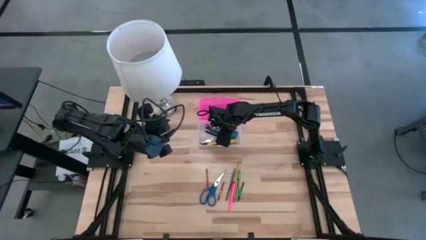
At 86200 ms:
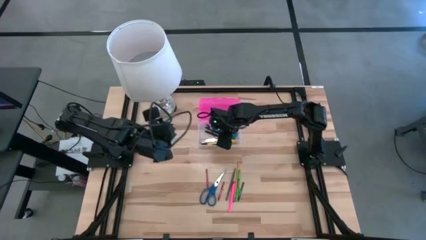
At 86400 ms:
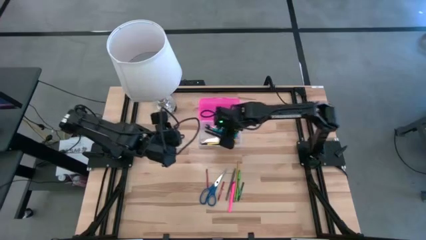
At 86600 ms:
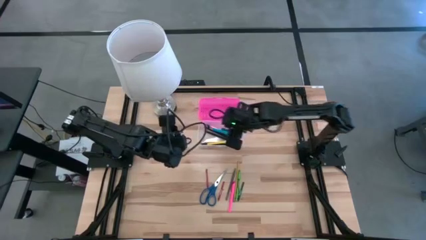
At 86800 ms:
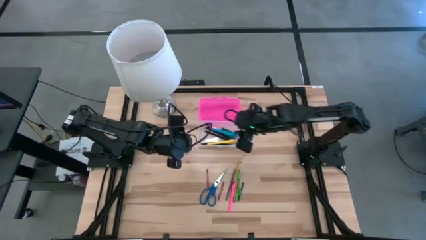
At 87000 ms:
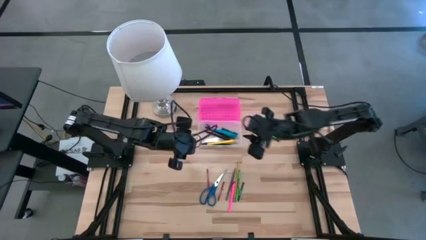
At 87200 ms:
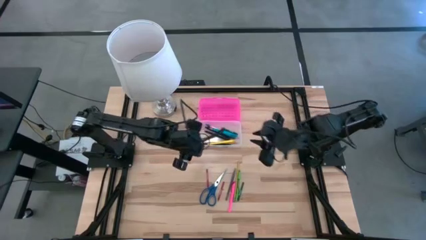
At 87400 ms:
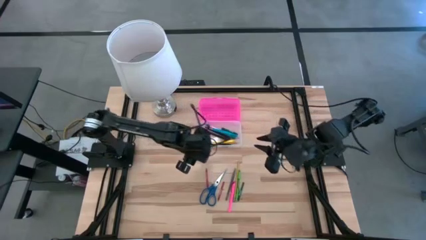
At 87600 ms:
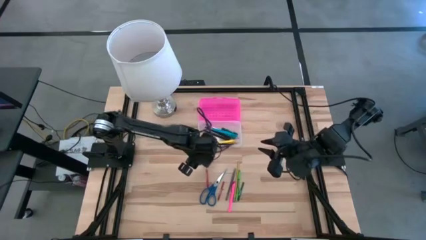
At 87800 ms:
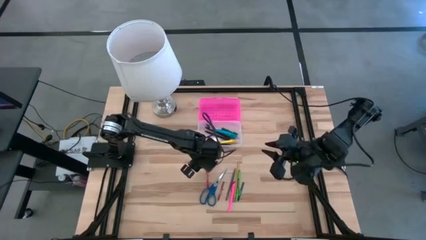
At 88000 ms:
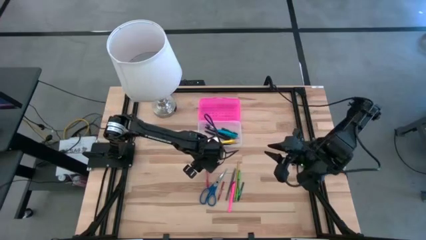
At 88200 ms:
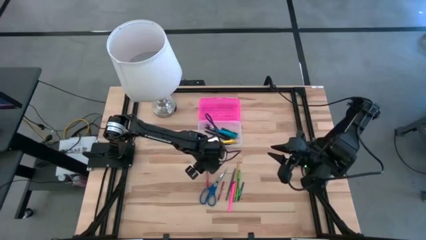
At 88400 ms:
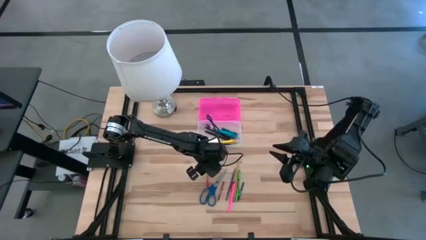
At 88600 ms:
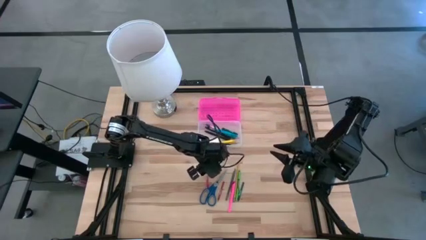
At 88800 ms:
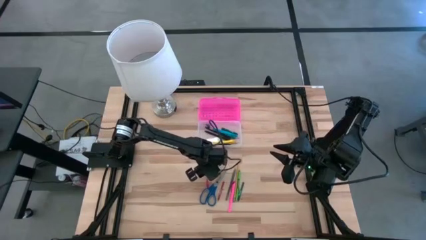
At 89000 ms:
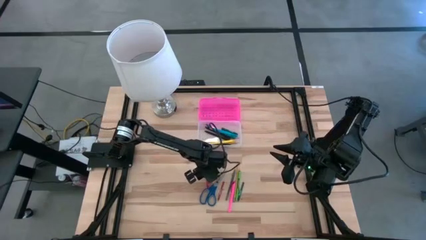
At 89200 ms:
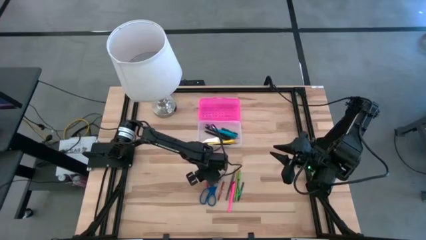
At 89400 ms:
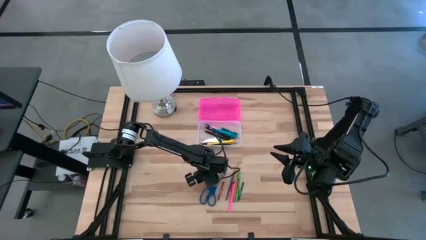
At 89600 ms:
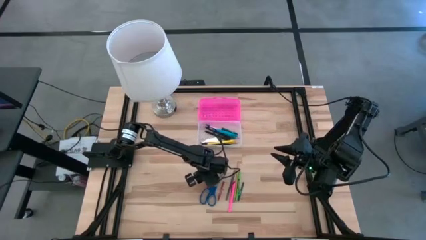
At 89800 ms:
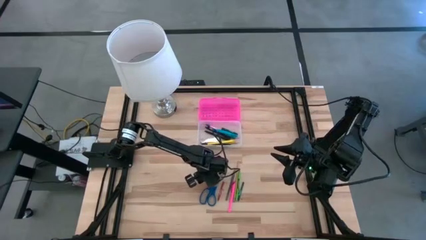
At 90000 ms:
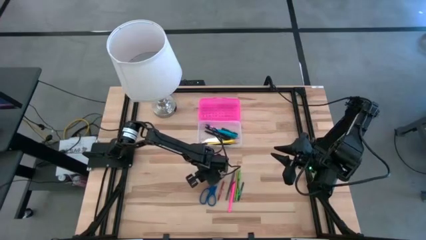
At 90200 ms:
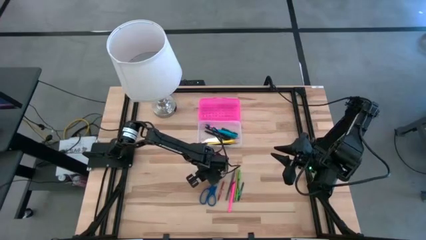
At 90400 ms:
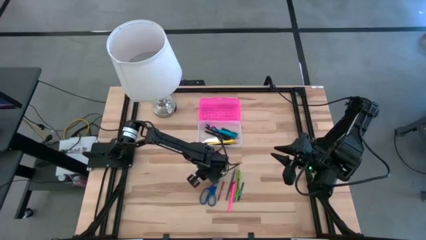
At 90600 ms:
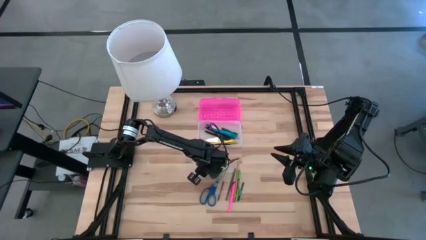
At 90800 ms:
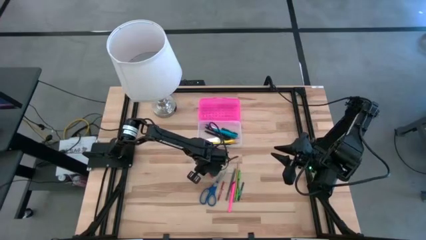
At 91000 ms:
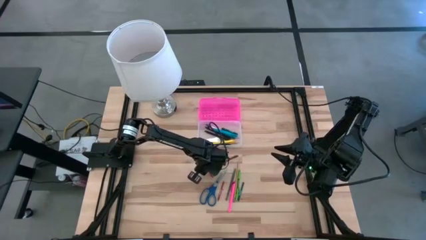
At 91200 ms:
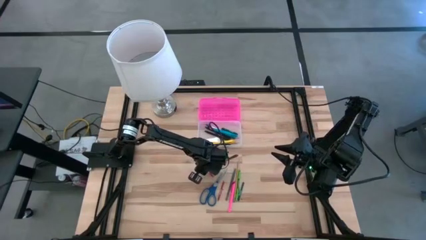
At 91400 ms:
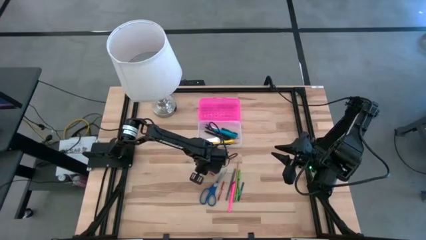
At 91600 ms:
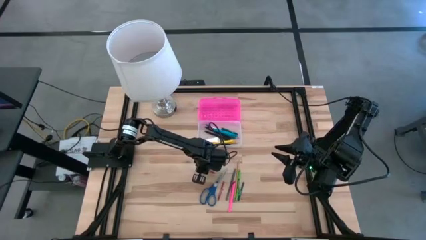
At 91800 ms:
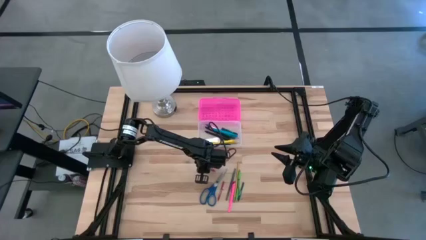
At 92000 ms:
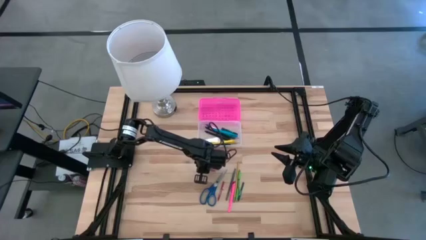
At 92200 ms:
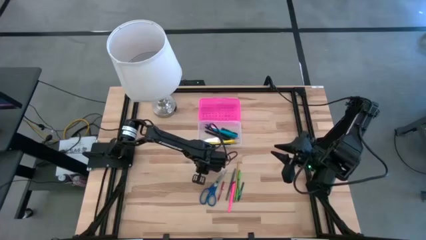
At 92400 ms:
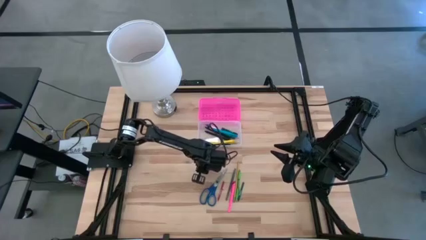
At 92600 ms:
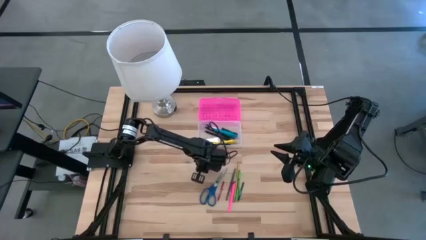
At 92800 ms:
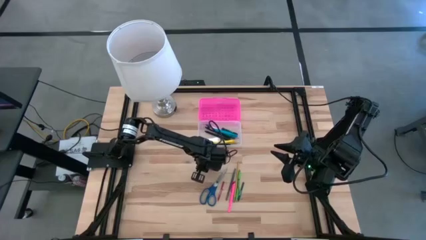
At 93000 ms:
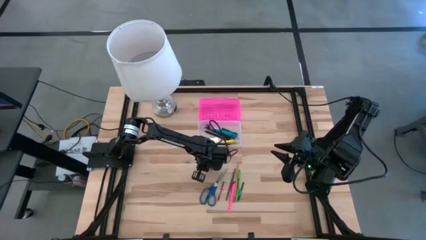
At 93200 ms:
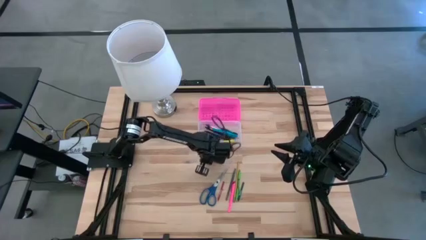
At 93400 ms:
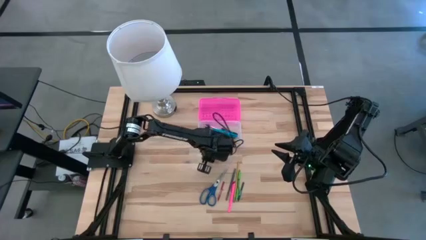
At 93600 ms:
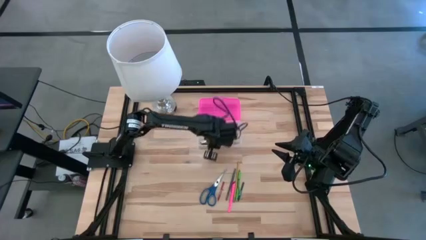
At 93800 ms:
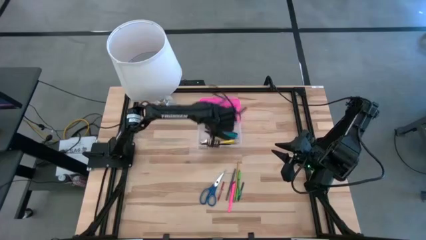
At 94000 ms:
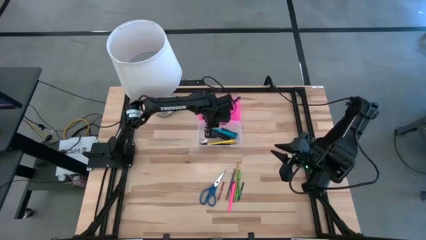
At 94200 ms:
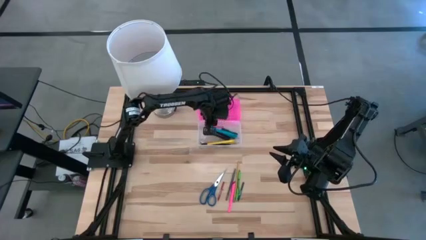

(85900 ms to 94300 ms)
Task: Pick & place school supplies into a supply box
Put the left red crayon into the pink supply box

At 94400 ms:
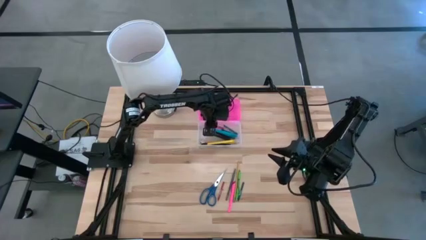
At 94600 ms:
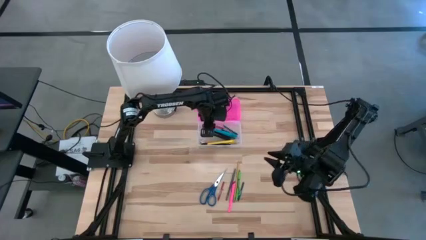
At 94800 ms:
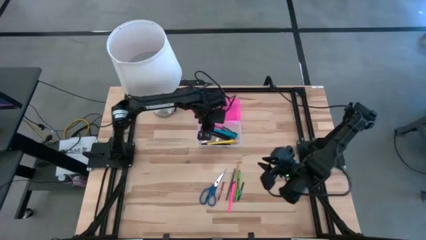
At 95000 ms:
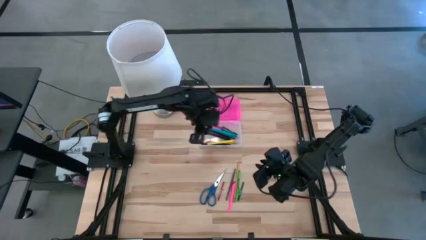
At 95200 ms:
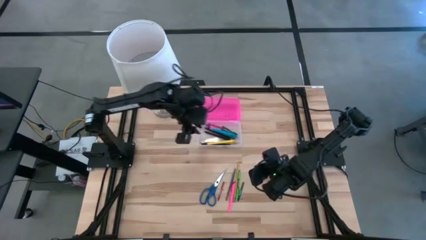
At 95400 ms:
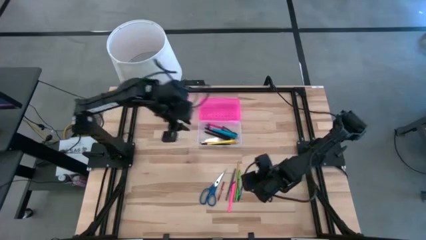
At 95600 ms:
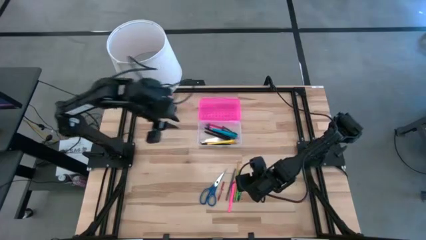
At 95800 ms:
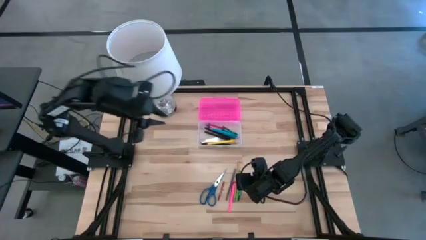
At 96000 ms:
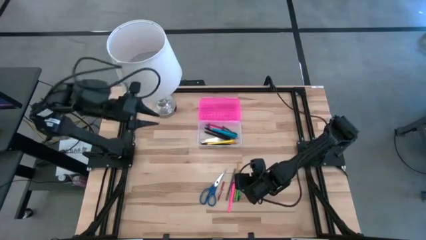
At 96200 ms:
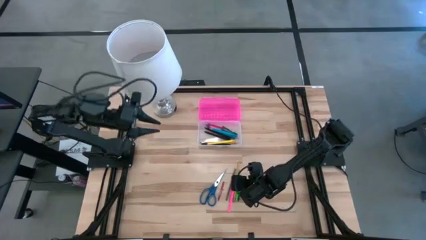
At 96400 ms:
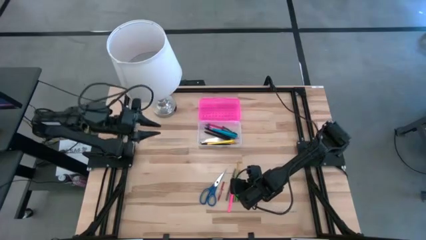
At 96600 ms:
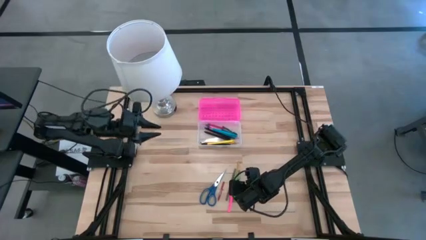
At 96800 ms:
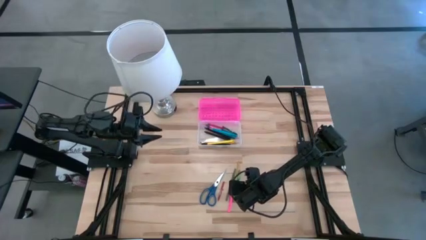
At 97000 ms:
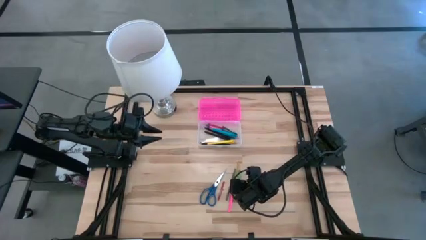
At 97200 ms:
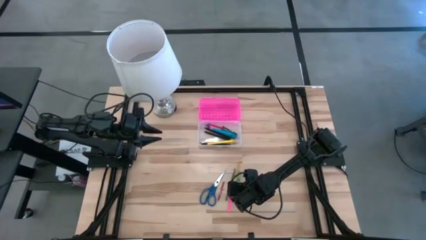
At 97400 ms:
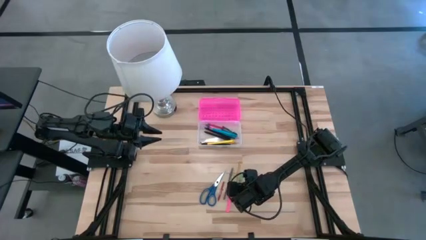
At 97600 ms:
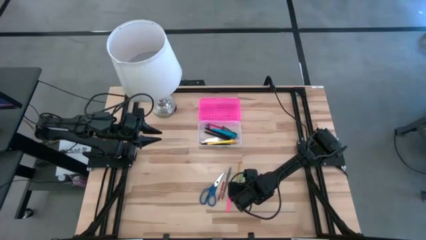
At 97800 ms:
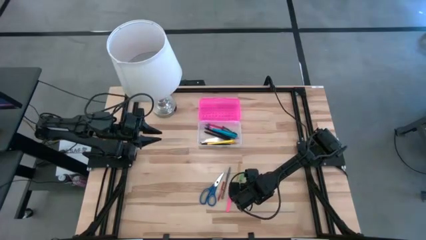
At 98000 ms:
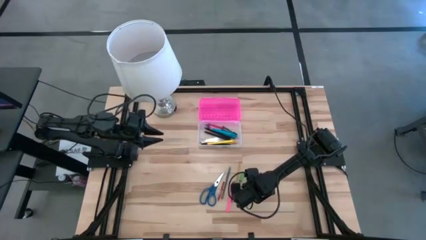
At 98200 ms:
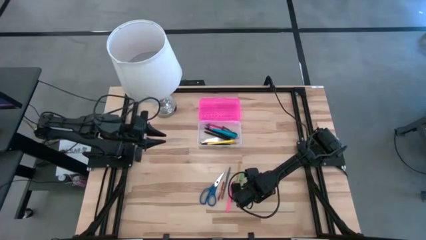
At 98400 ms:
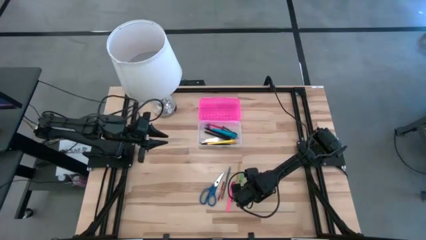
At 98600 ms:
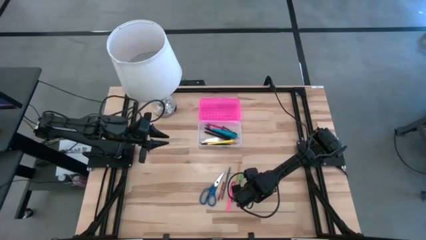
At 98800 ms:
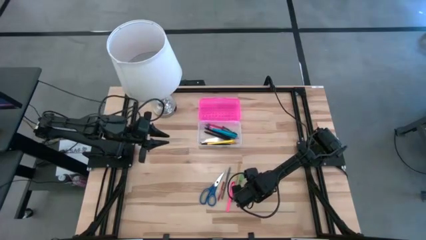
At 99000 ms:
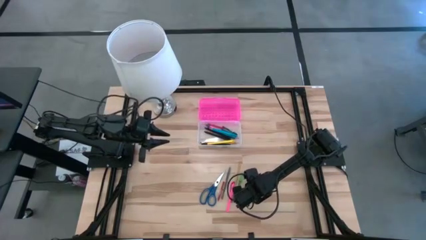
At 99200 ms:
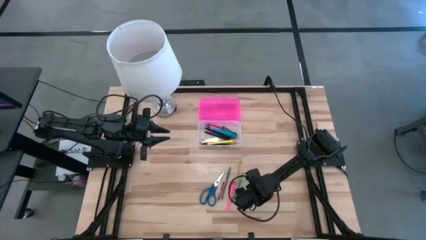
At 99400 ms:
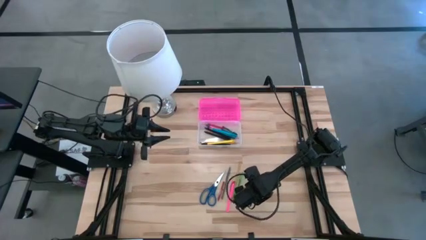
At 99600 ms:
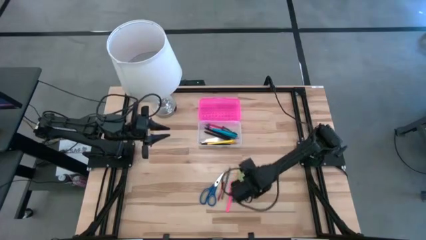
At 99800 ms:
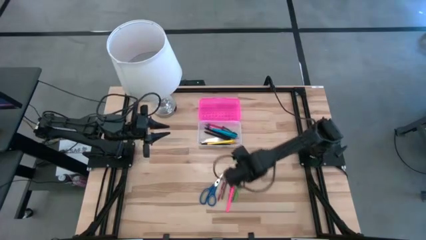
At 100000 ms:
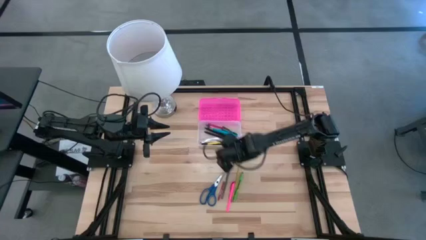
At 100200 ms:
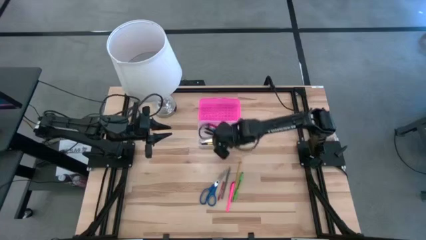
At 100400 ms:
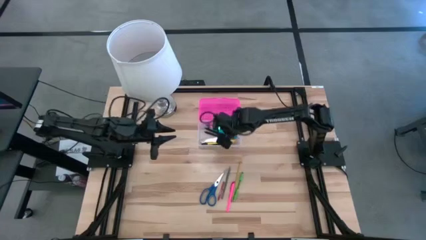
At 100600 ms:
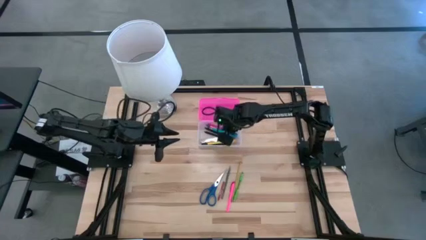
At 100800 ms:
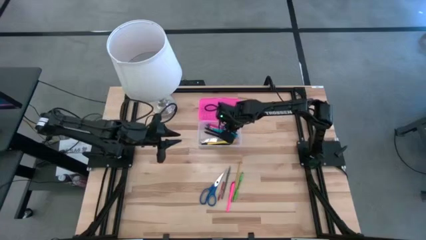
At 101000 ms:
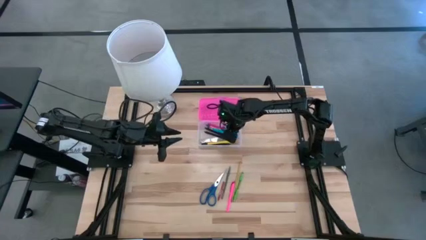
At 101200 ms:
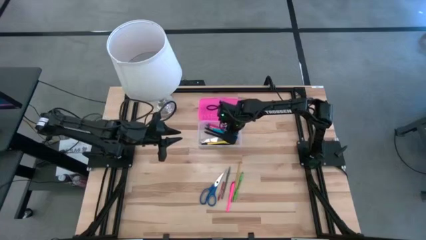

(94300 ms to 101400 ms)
Put the green crayon into the pink supply box

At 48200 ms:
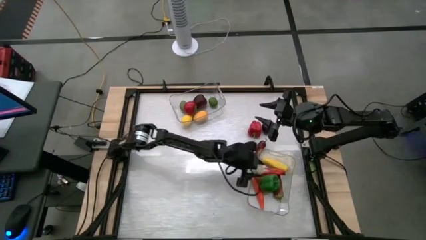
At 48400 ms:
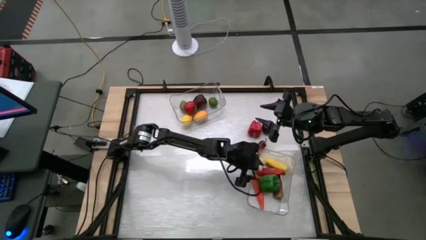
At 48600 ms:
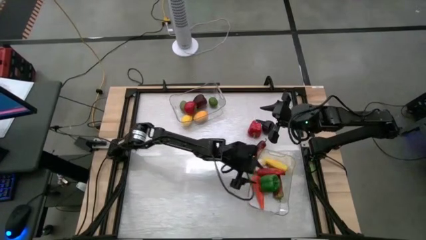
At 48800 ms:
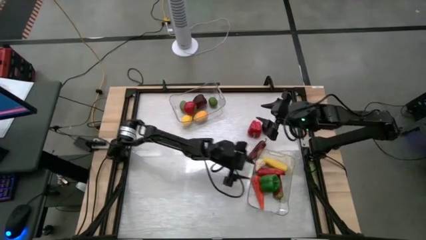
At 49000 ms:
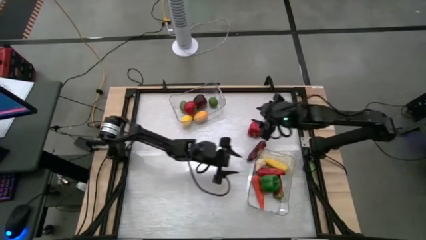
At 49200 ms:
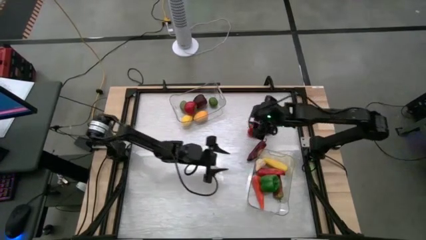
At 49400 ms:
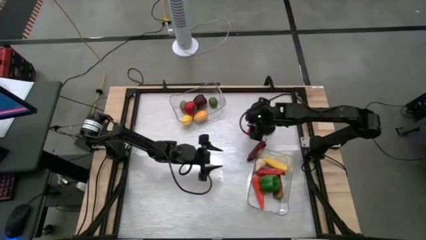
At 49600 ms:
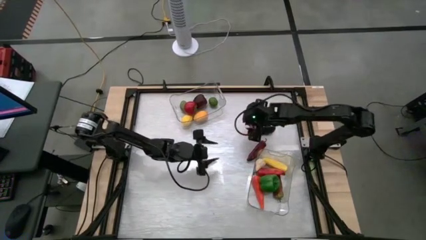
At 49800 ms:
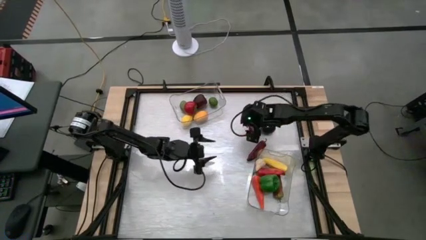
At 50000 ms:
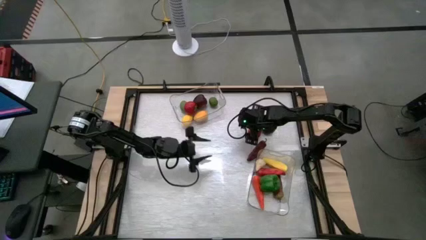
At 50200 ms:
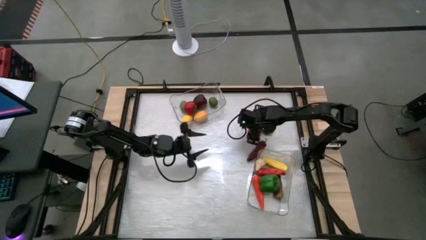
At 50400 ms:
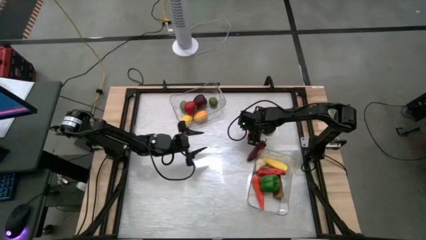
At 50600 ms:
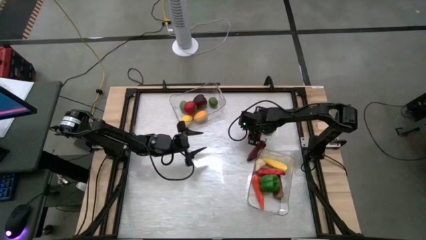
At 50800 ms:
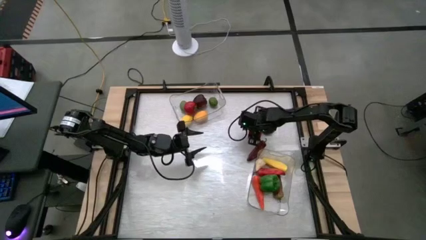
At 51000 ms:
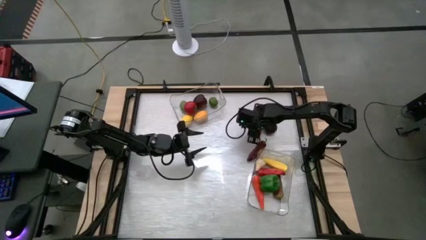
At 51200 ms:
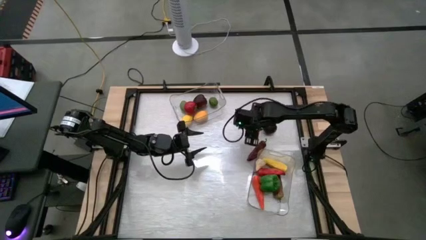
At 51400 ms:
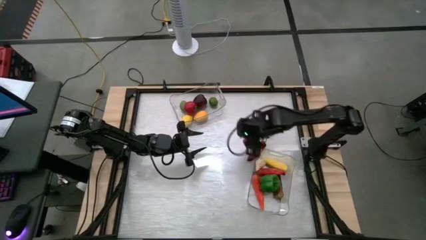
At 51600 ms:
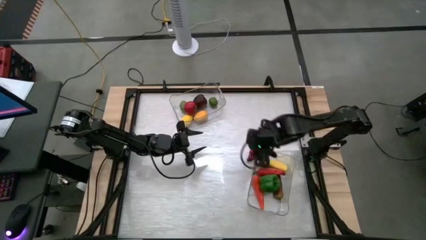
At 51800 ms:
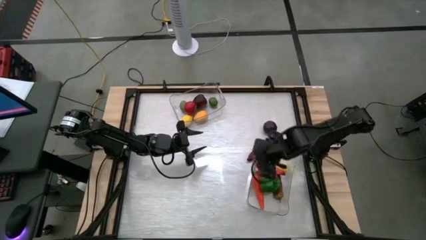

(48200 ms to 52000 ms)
Task: Sort produce into baskets
Put the red bell pepper into the bottom transparent bin
